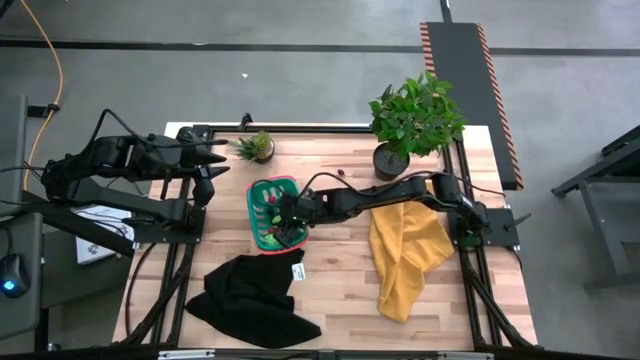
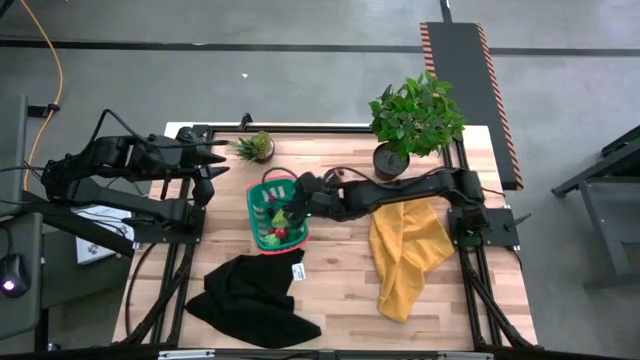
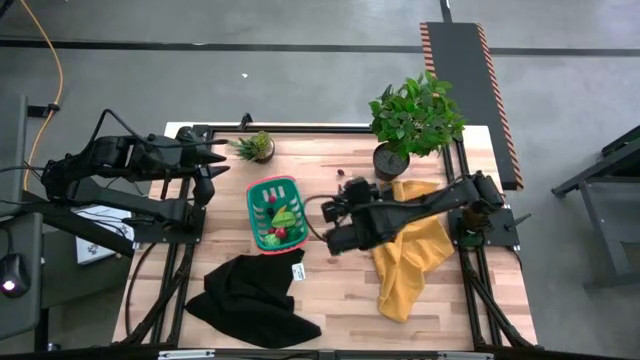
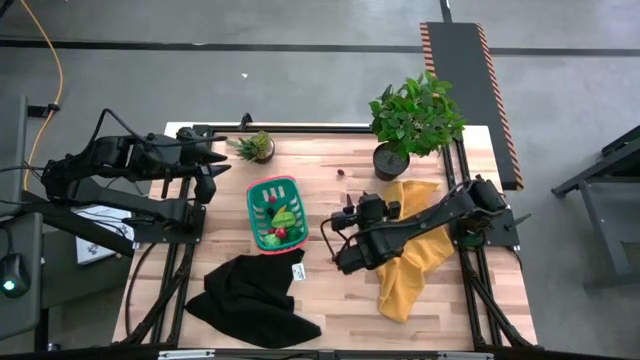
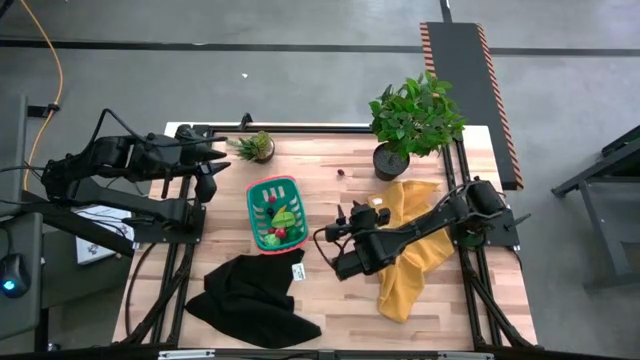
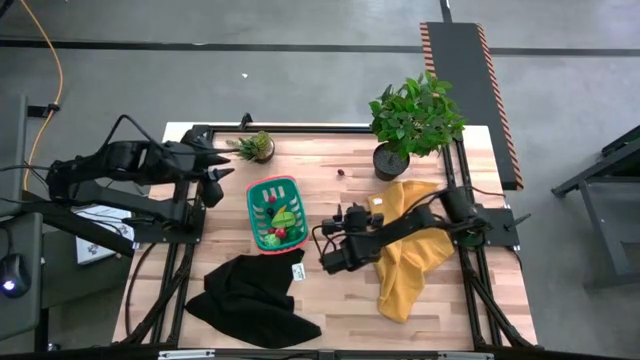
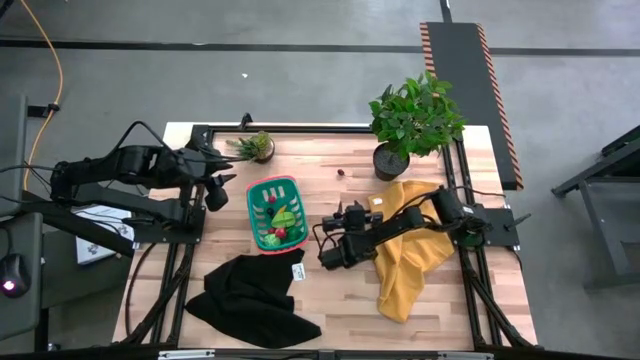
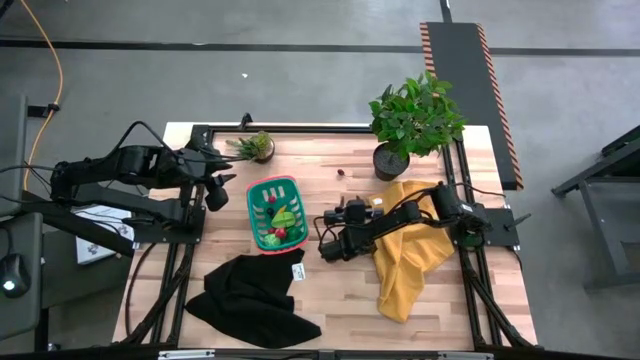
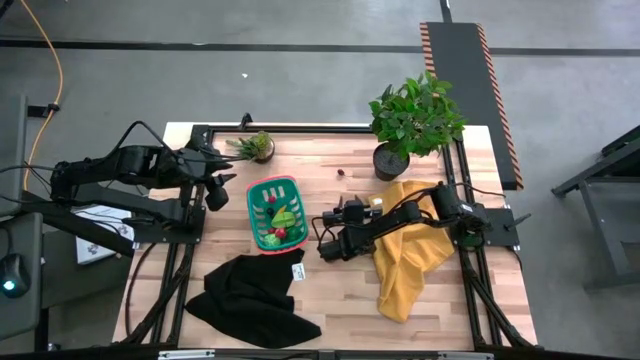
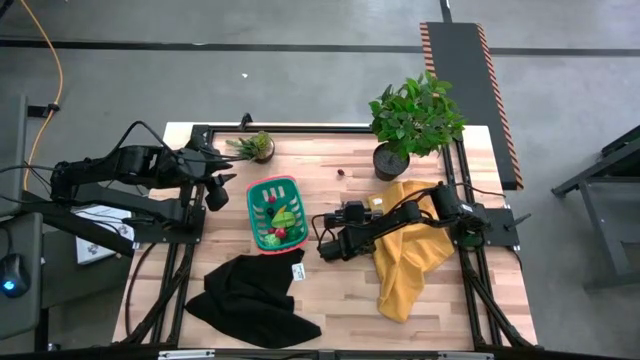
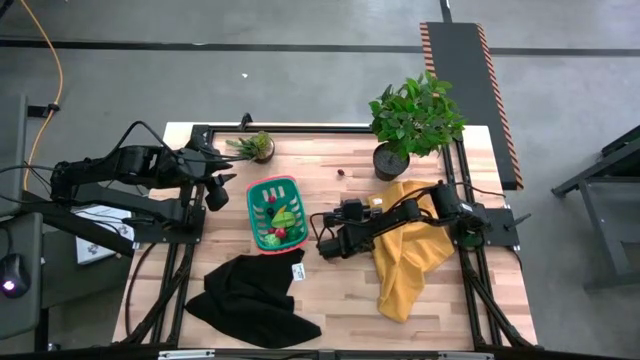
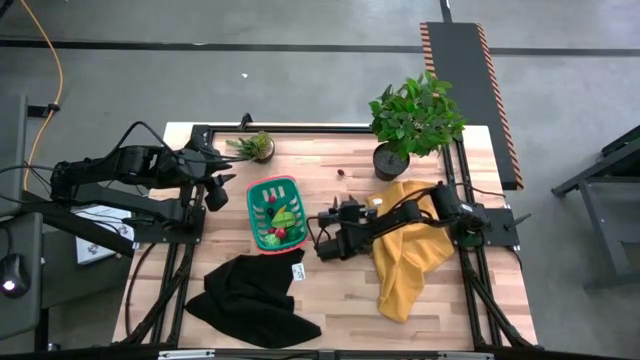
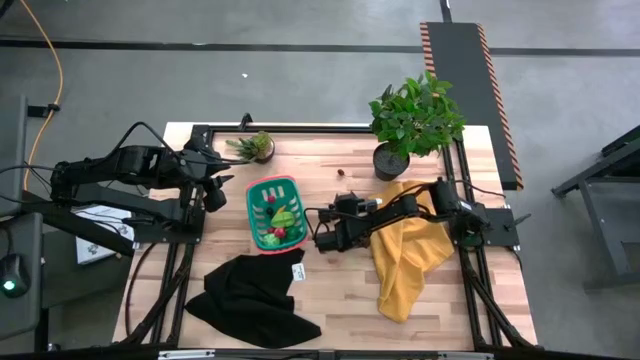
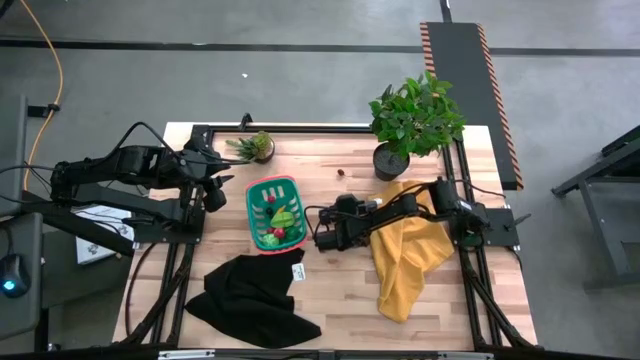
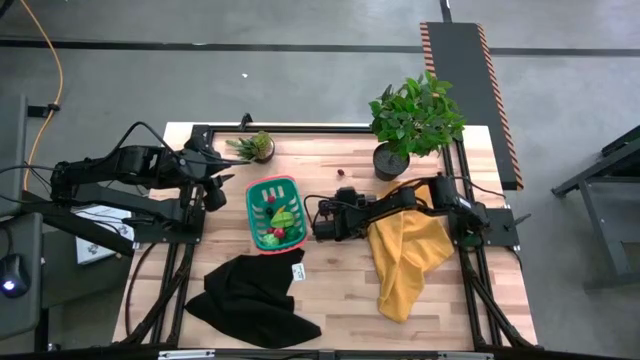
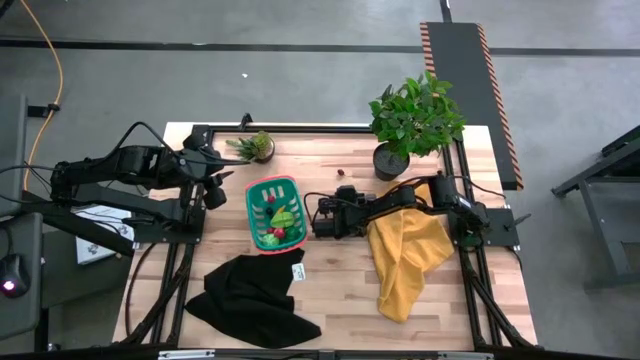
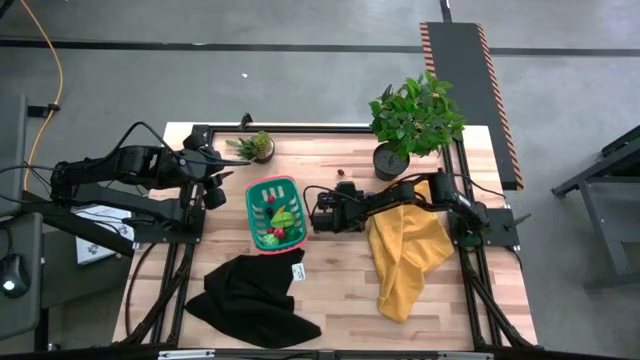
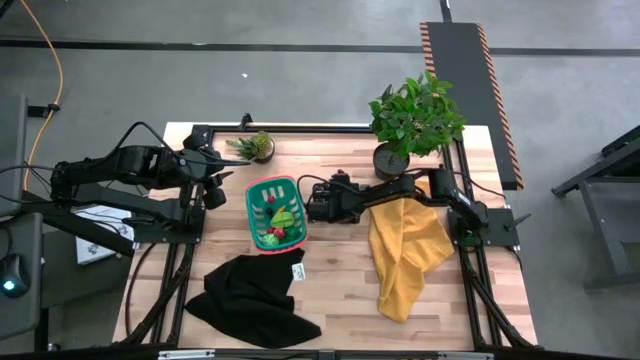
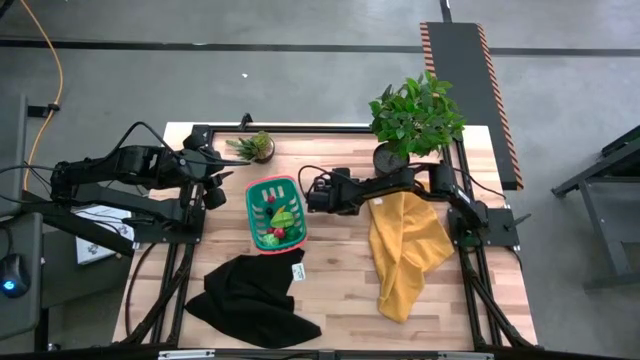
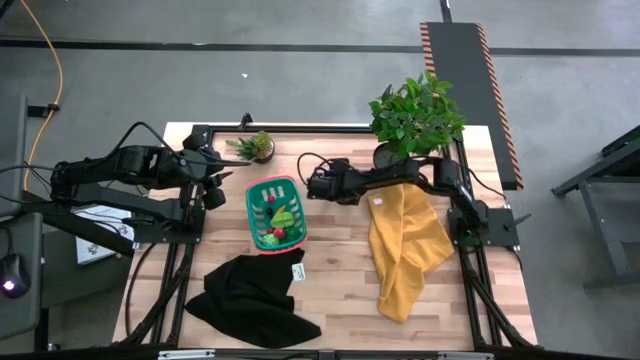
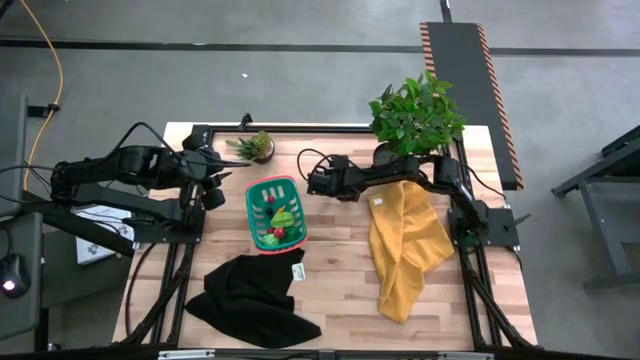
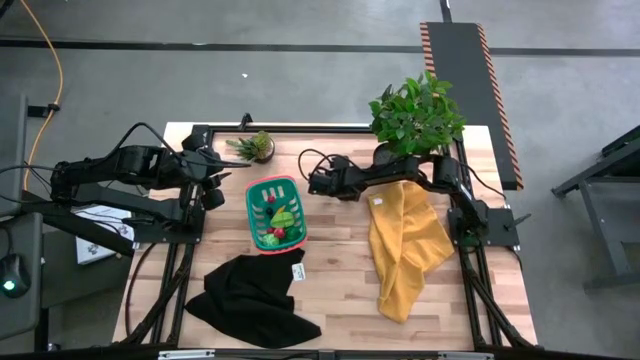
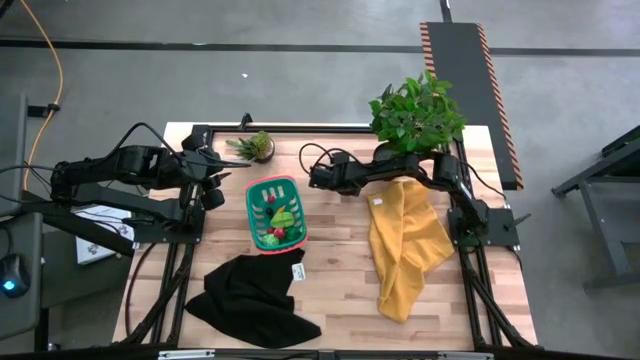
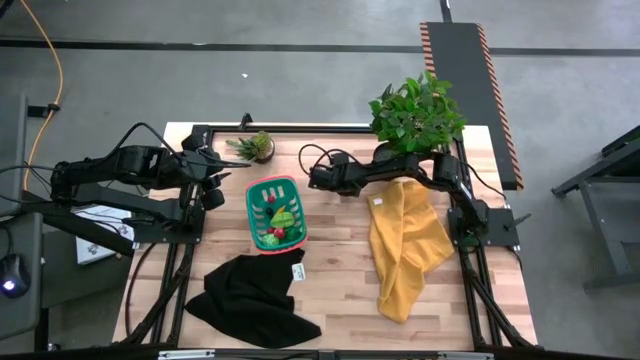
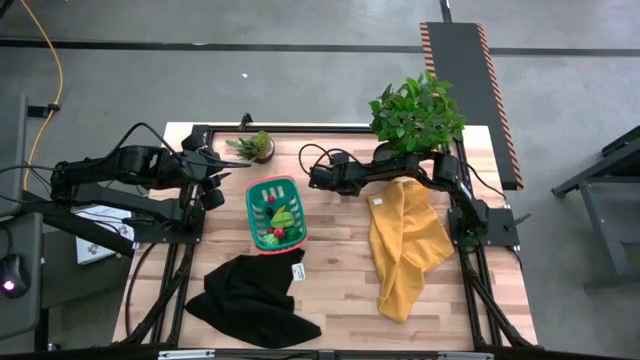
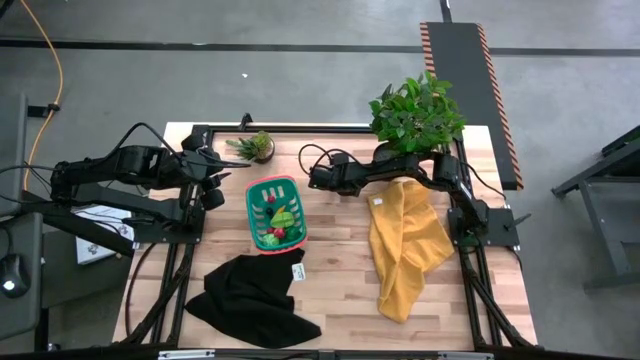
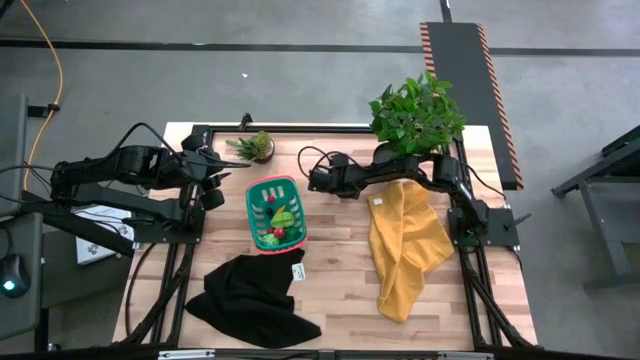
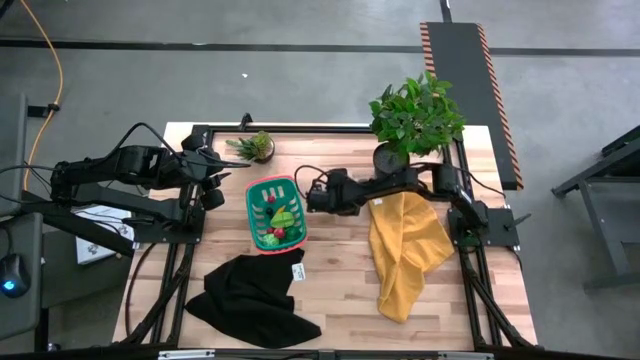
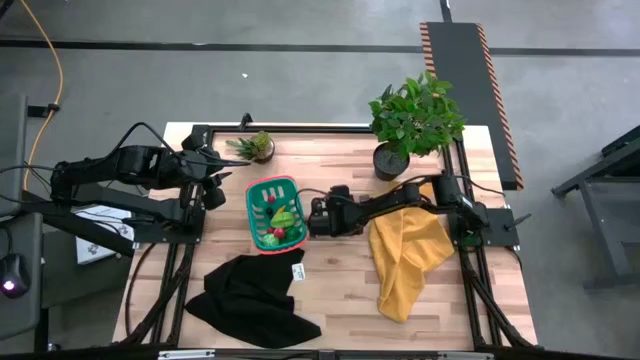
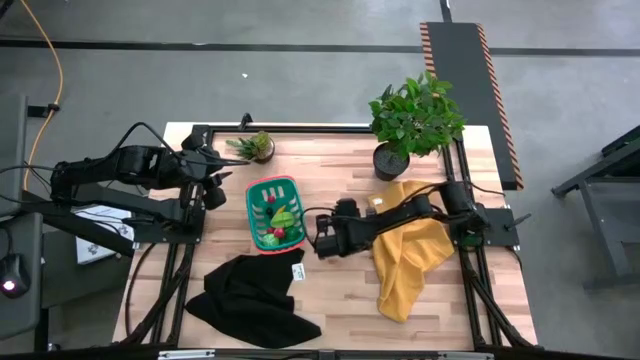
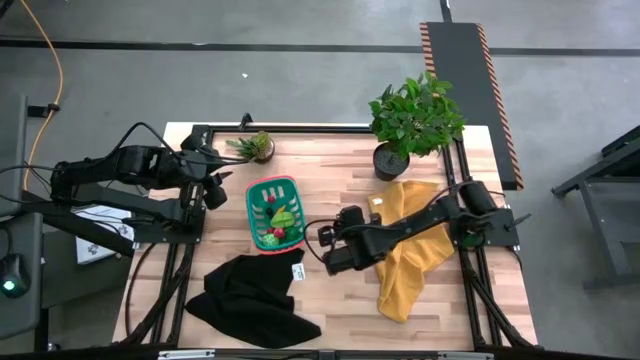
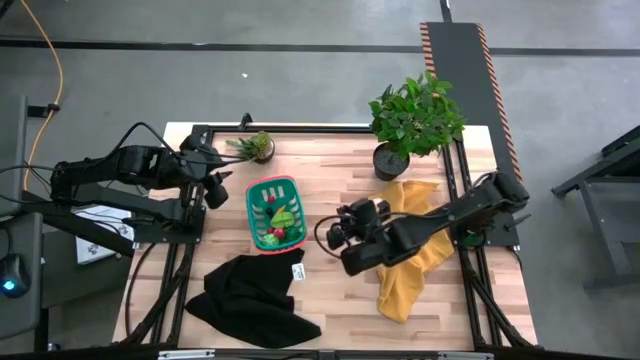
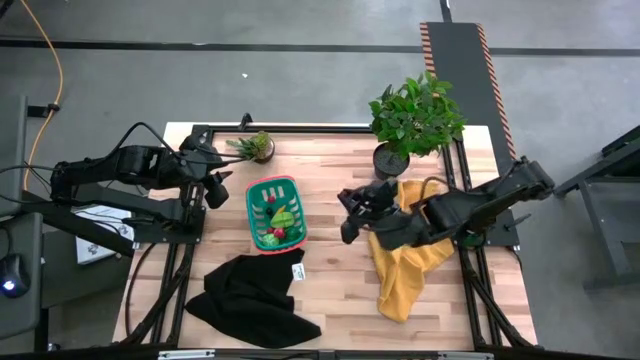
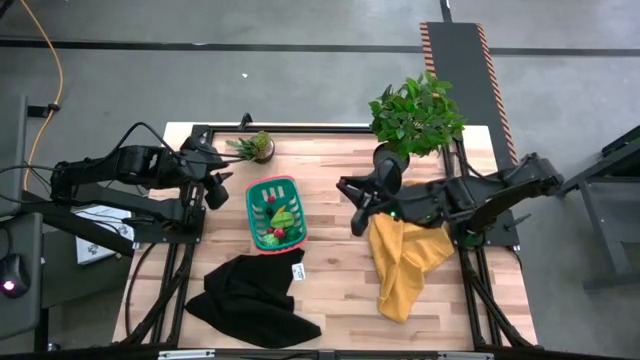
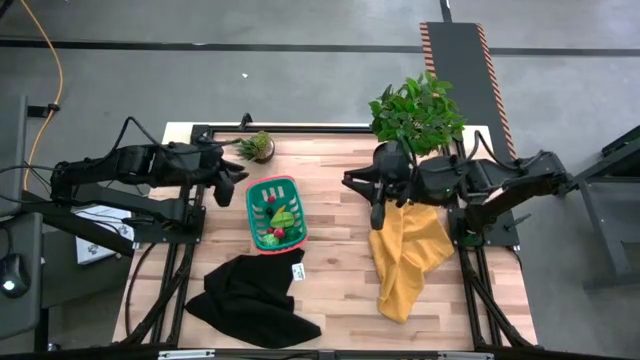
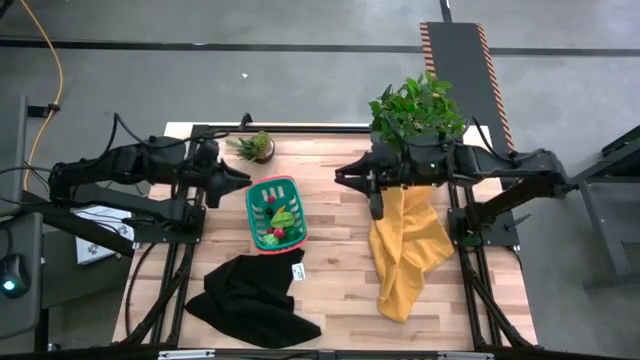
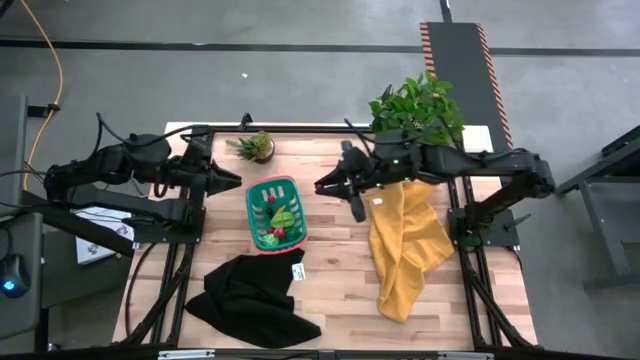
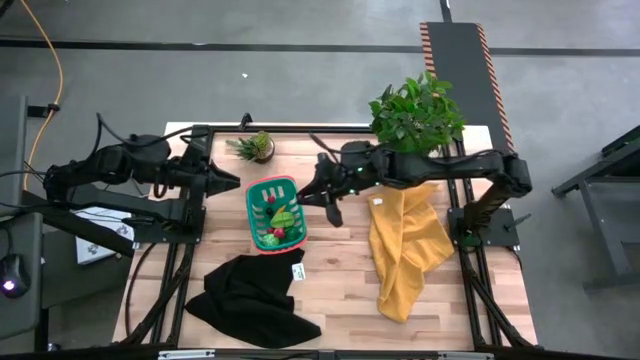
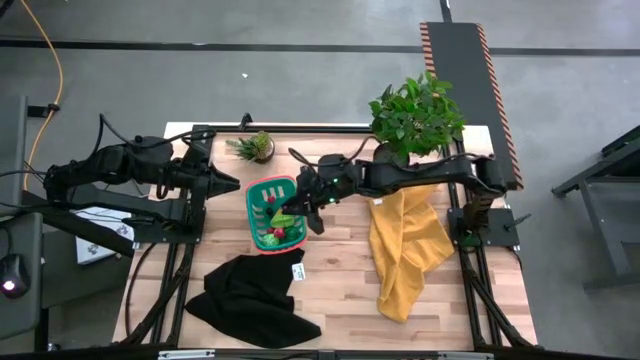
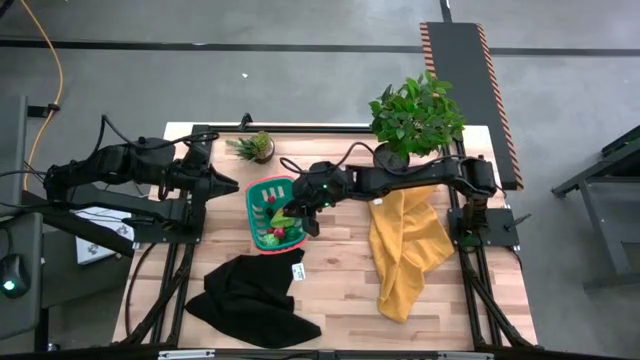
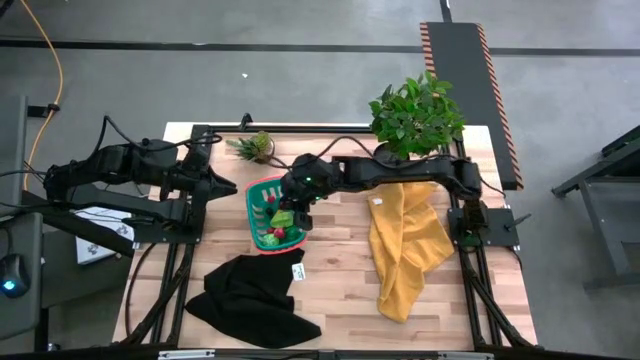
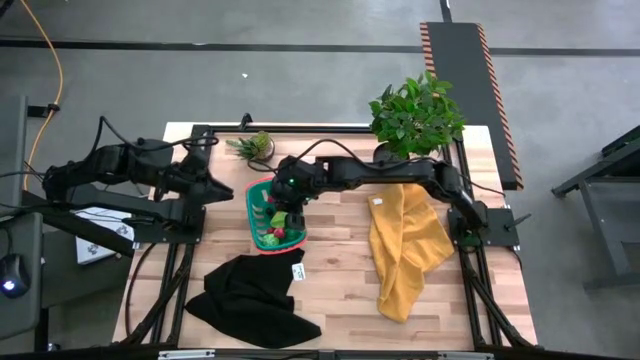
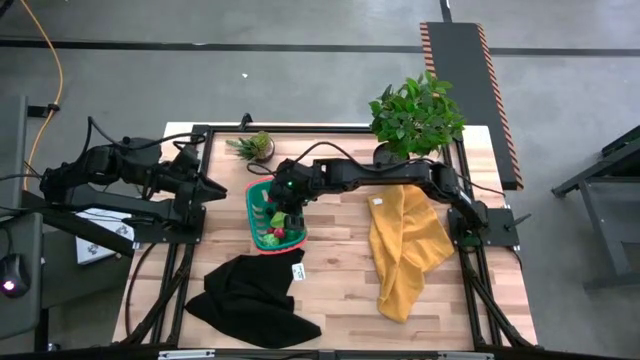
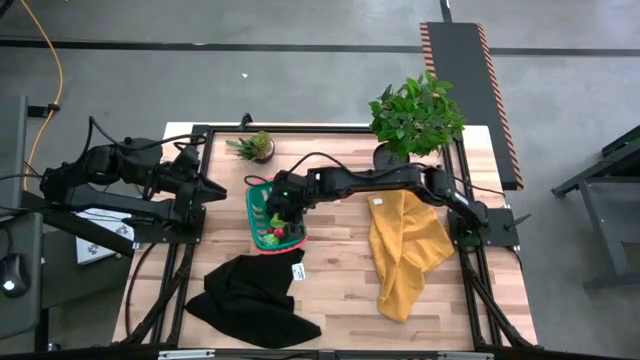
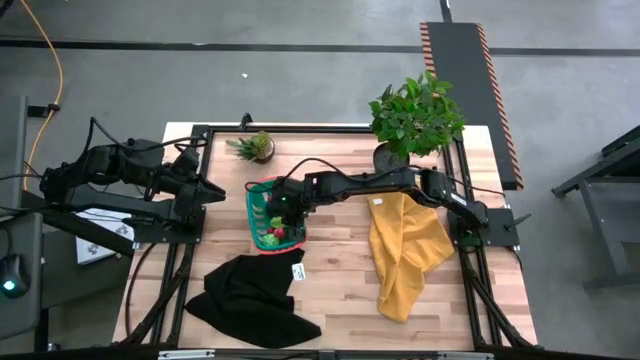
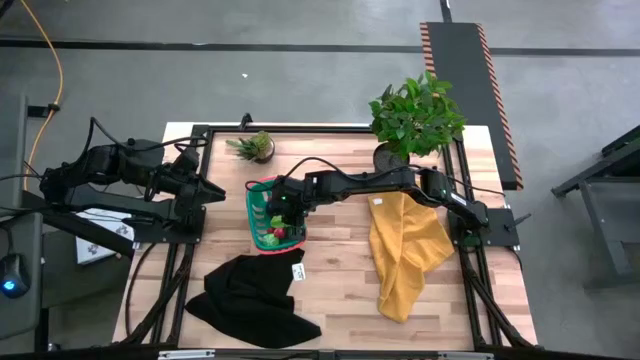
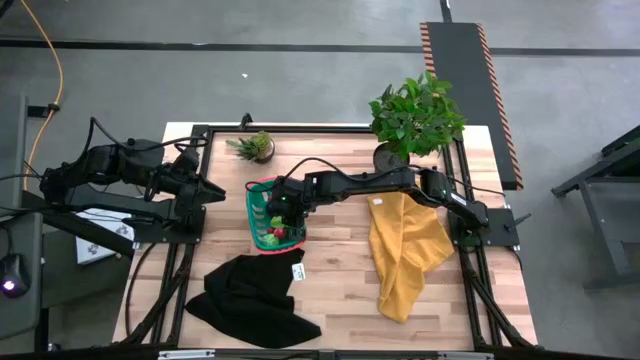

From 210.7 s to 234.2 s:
Task: Pick and placing Produce into tupperware
Put the red cherry in the green basket
